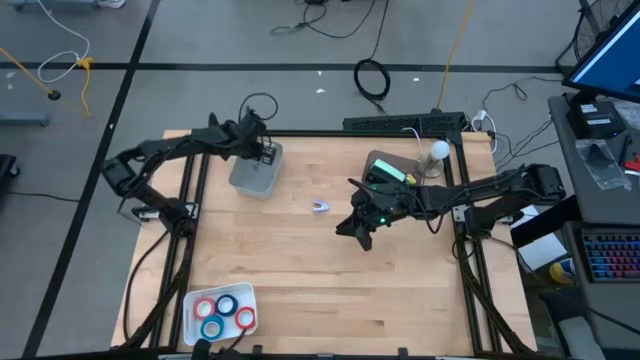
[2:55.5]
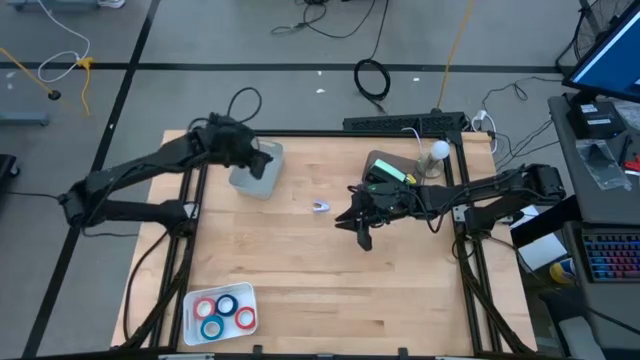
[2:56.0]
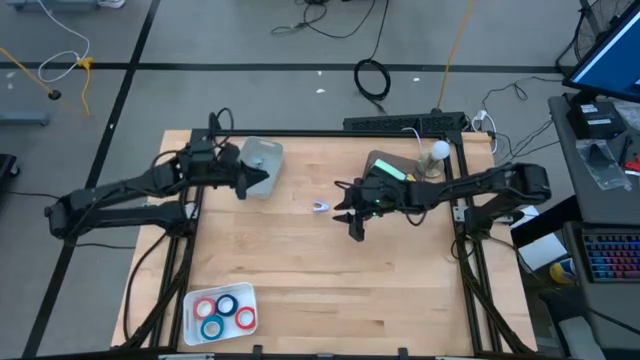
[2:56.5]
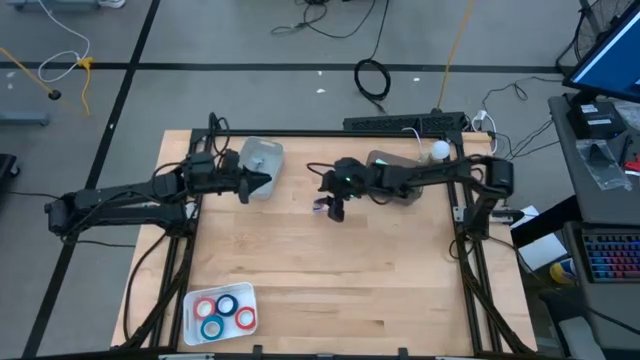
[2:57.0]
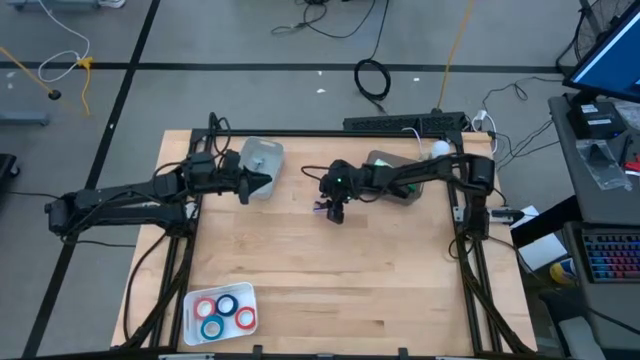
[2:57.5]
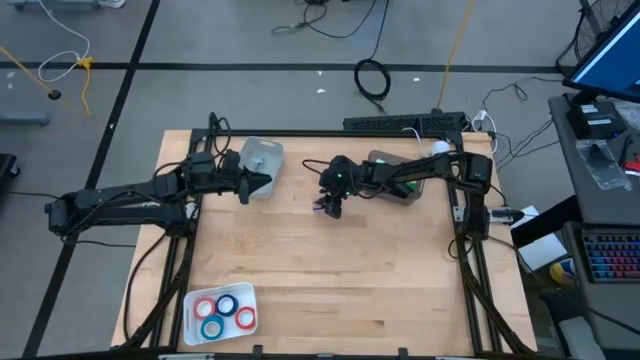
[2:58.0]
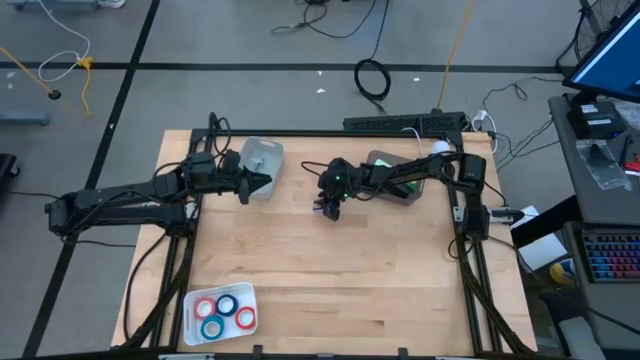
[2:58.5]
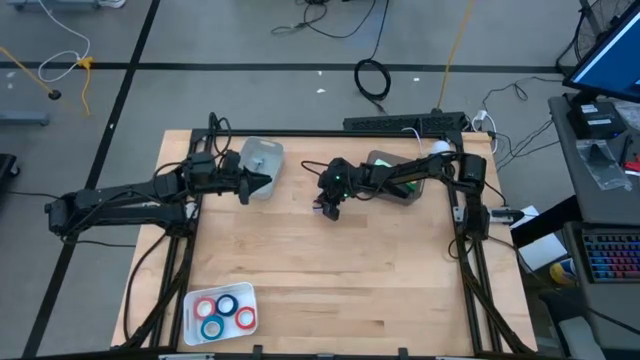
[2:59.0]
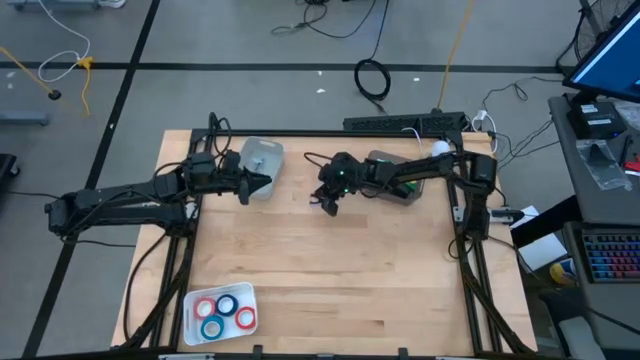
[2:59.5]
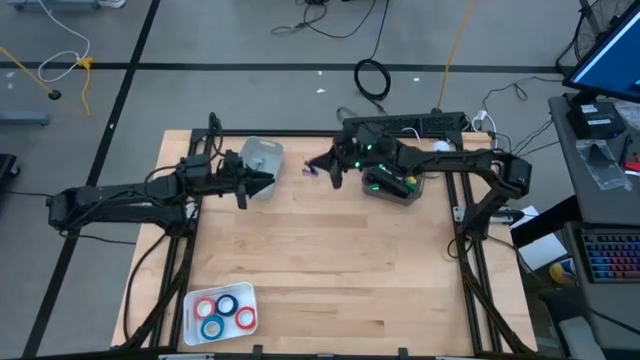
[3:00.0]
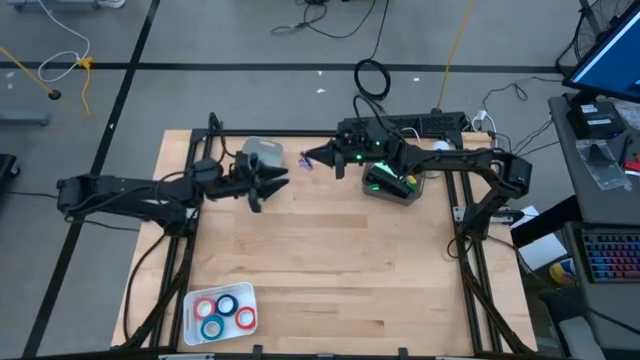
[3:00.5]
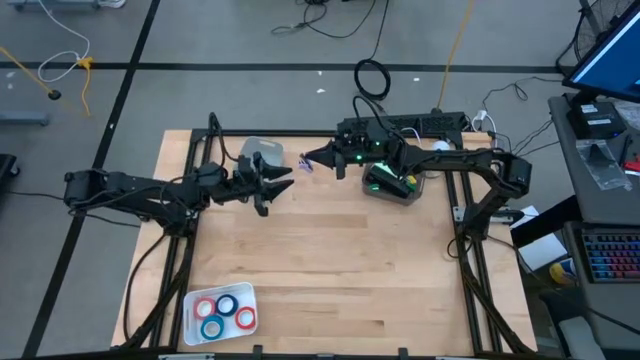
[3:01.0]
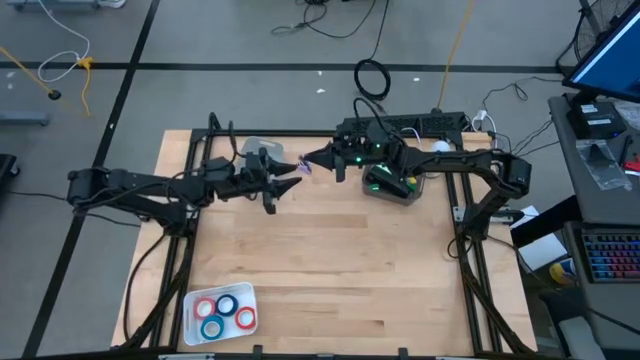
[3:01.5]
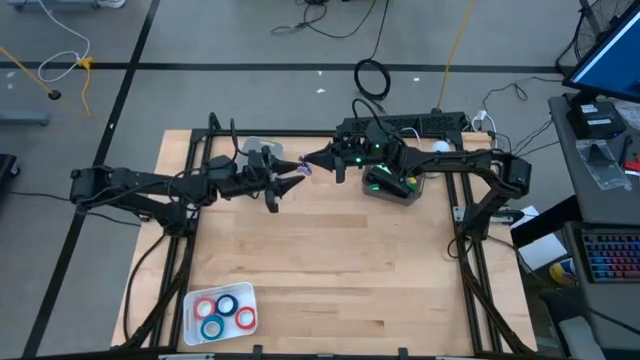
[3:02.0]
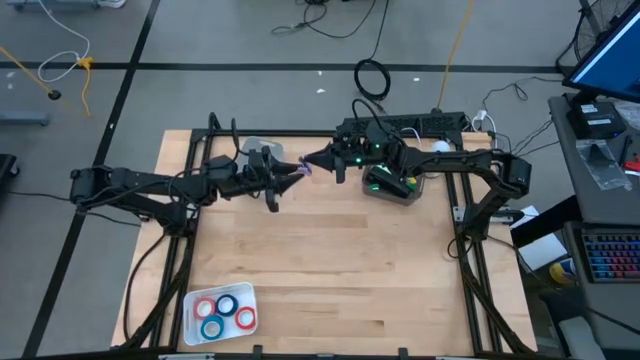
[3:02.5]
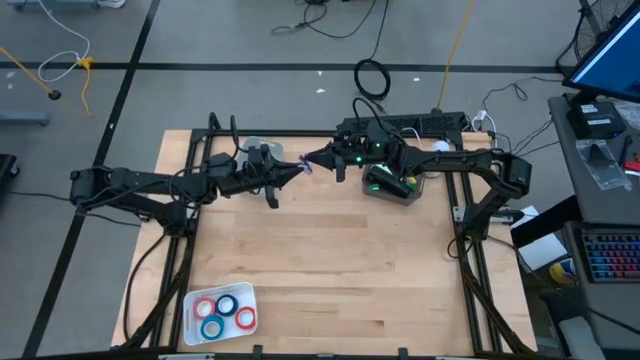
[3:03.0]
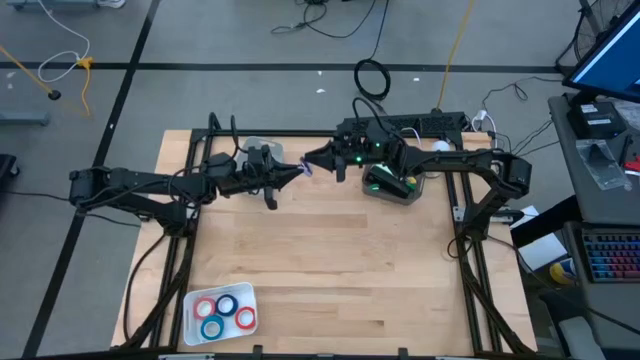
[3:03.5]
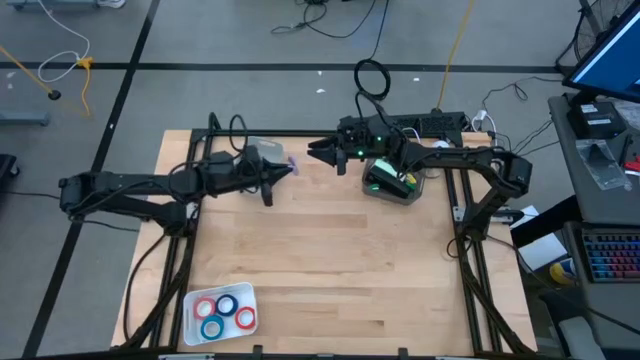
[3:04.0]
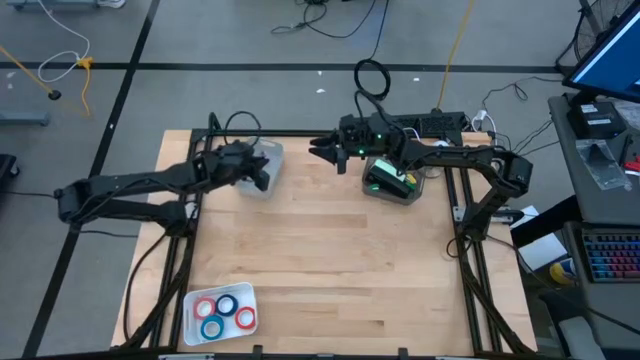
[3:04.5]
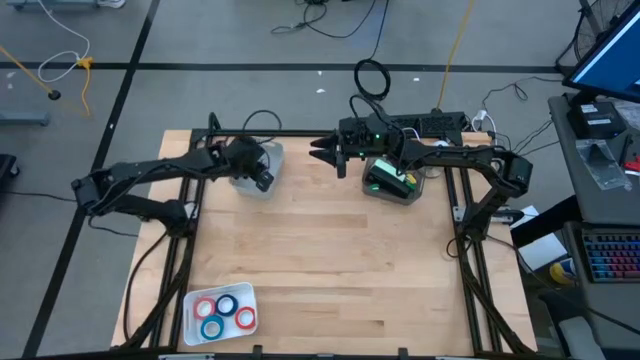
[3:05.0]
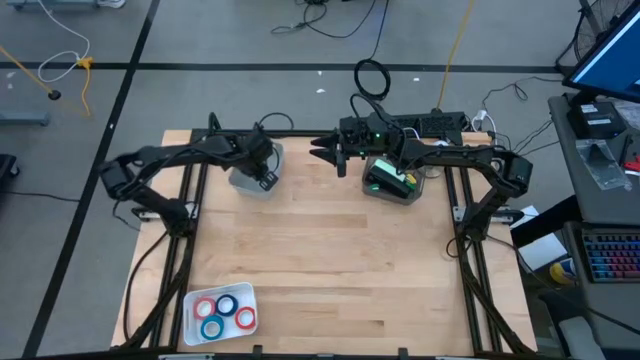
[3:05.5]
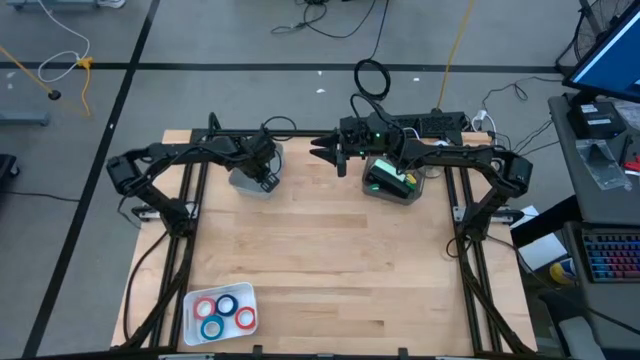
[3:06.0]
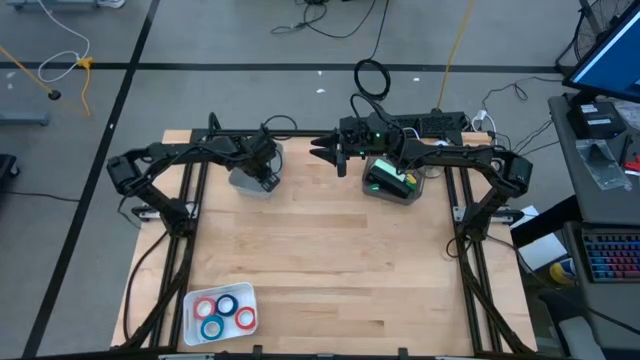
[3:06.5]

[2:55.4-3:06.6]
Task: Pick and place Stapler, Stapler remover, tape
Put the violet staple remover into the gray bin

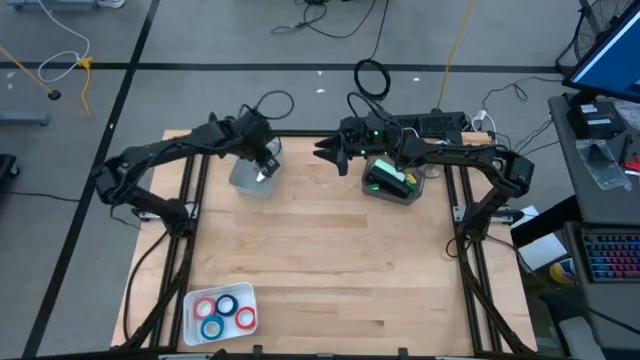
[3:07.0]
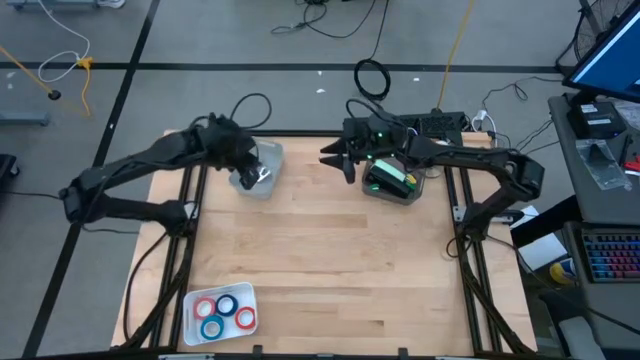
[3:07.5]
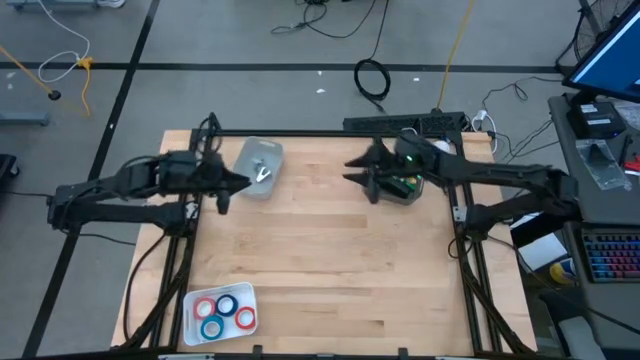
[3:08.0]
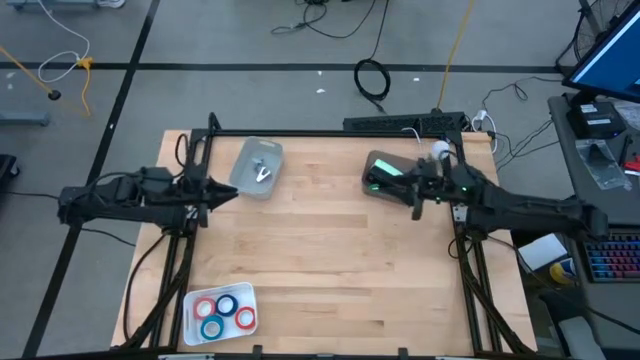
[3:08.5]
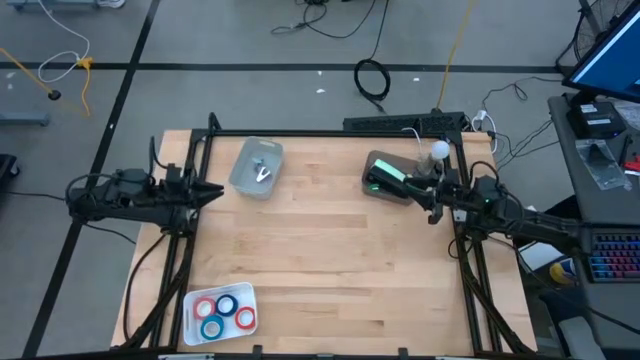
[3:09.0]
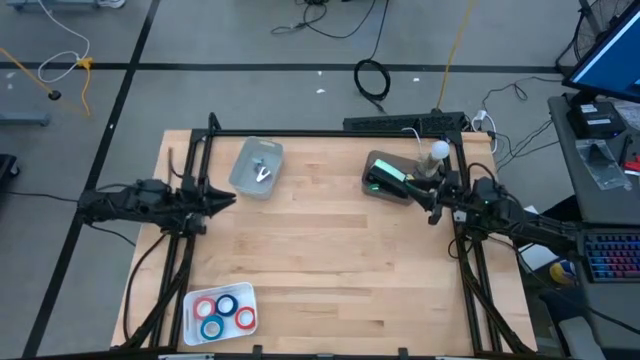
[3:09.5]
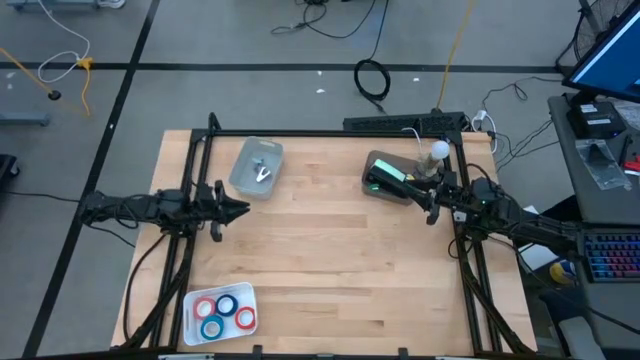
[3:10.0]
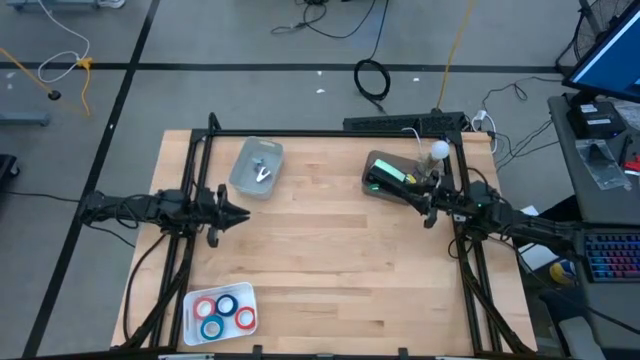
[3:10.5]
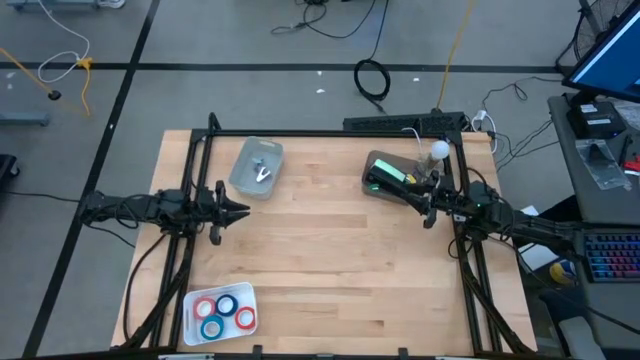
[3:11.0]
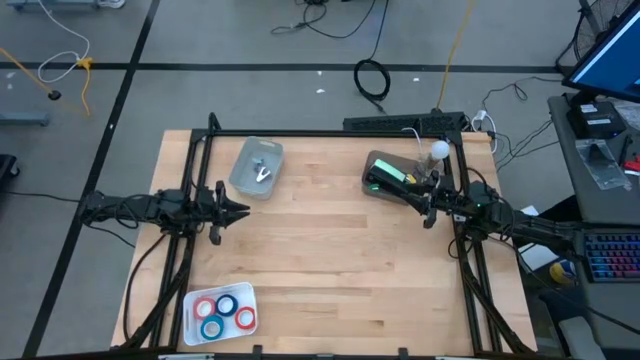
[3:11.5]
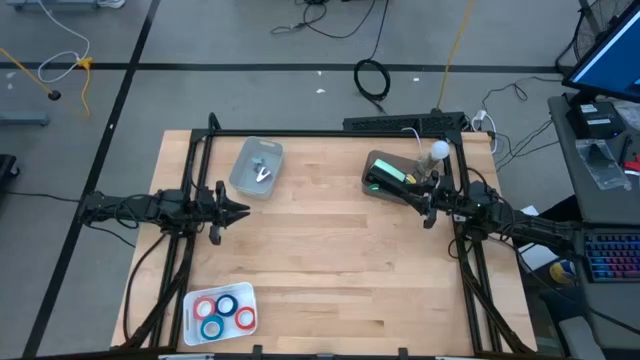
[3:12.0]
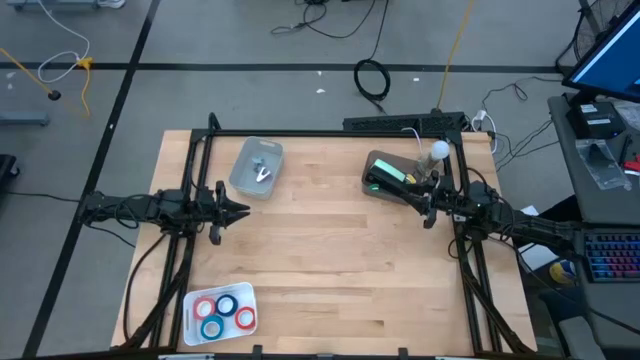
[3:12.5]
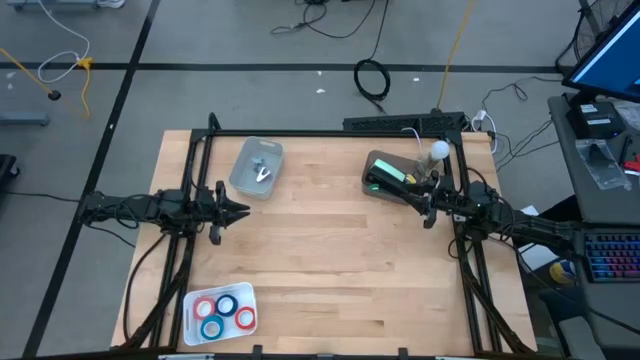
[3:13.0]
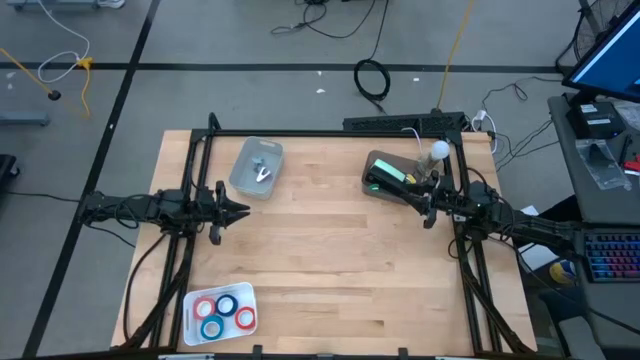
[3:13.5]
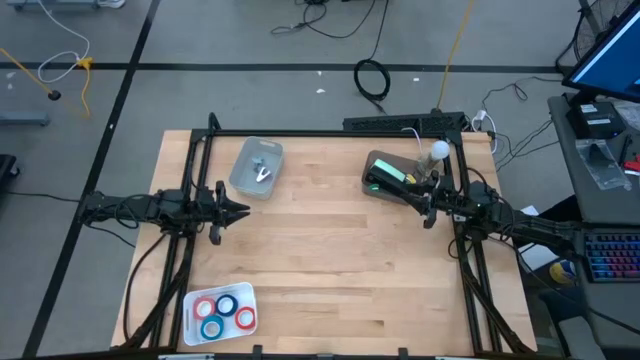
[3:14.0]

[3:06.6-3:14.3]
Return to Home Position

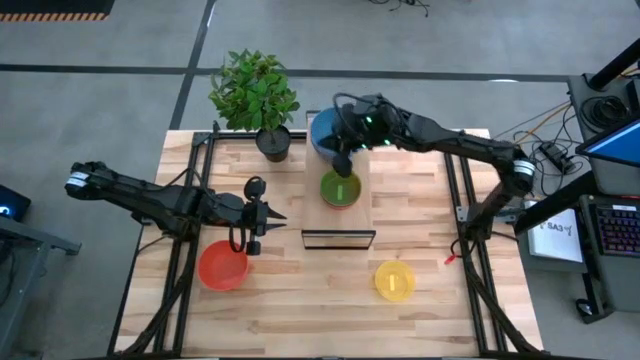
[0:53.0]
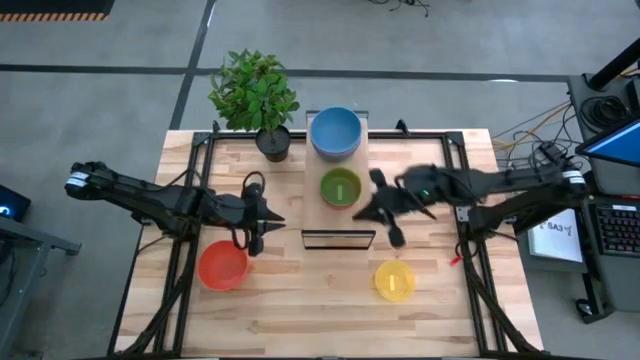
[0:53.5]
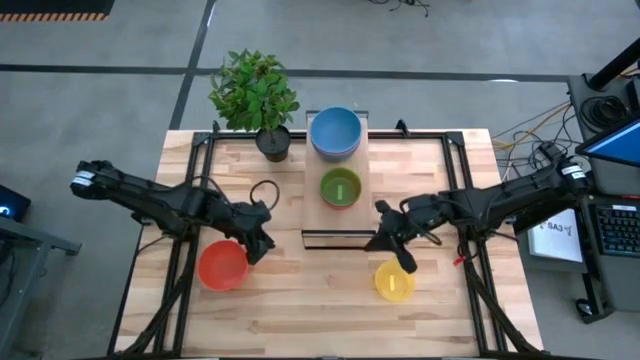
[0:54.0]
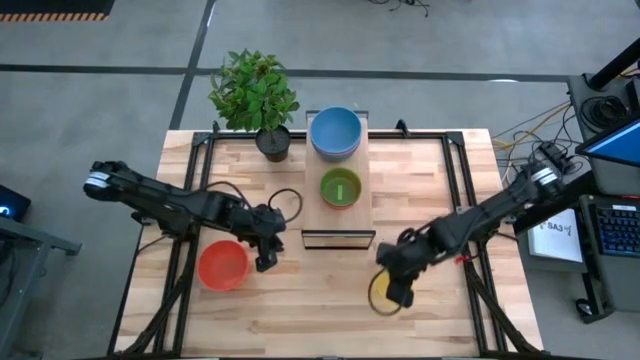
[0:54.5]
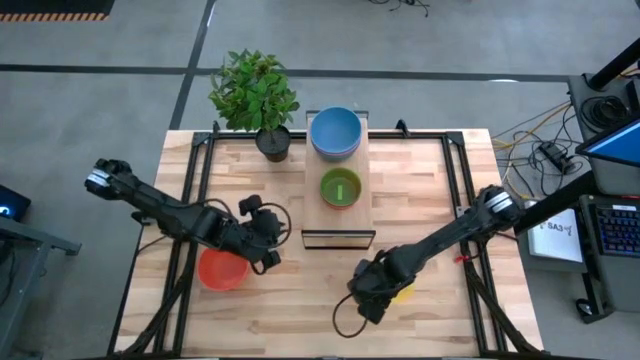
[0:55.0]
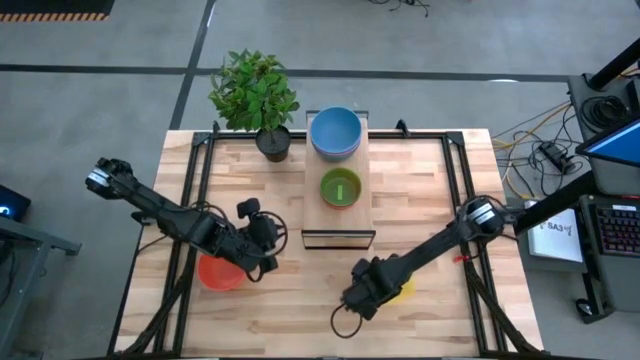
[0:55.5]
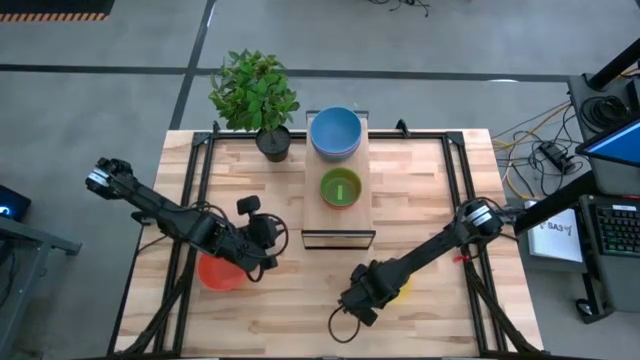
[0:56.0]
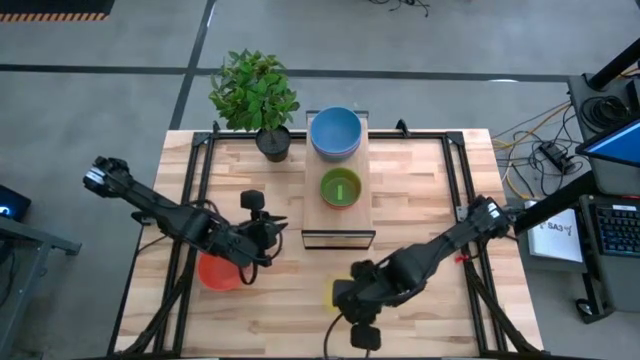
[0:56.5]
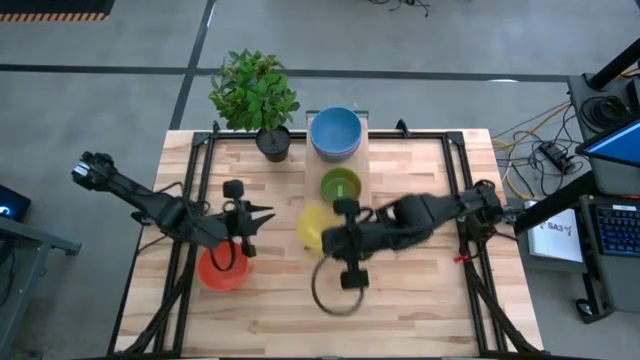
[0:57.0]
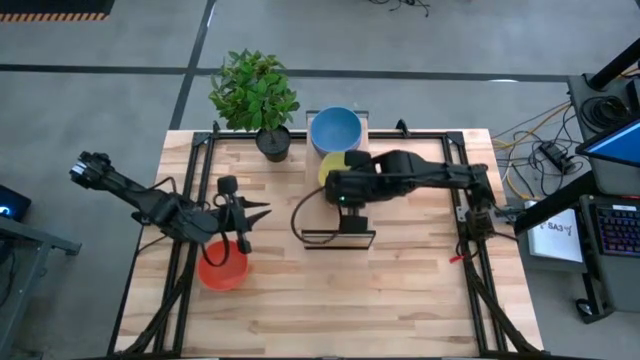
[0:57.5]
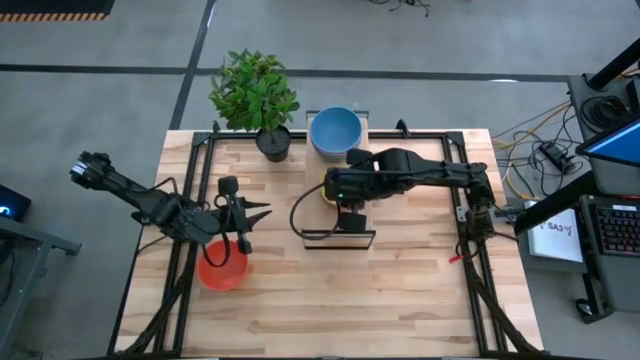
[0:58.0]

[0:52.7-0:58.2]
Task: Place and stack bowls onto a shelf
Stack the yellow transparent bowl into the green transparent bowl on the shelf
